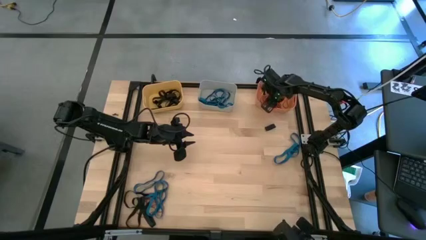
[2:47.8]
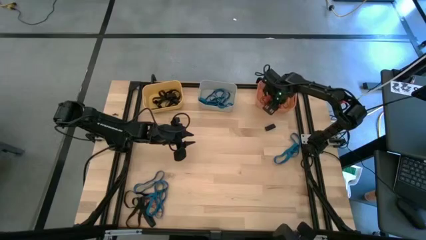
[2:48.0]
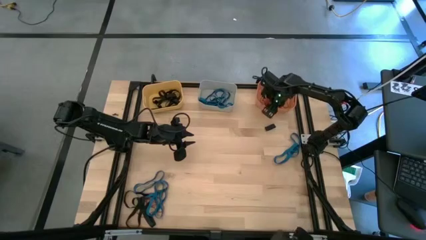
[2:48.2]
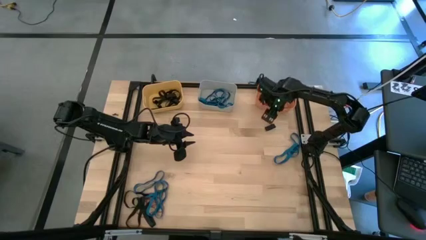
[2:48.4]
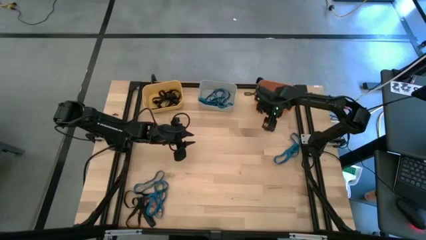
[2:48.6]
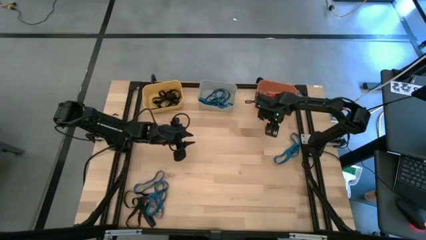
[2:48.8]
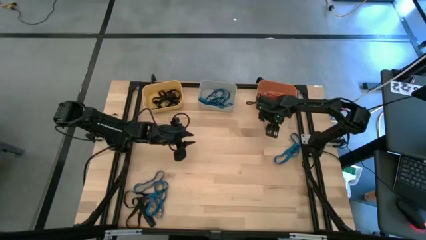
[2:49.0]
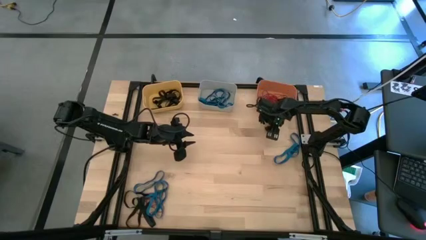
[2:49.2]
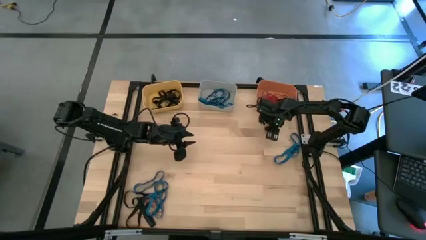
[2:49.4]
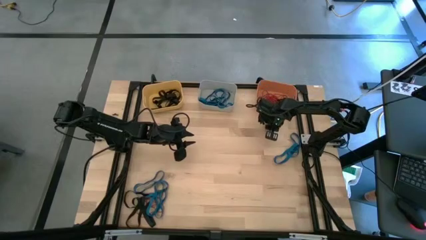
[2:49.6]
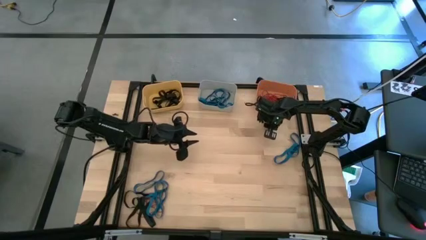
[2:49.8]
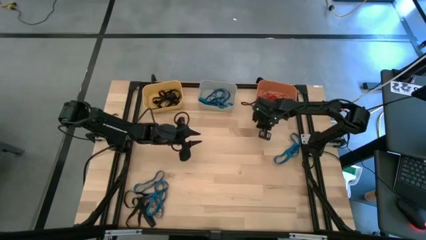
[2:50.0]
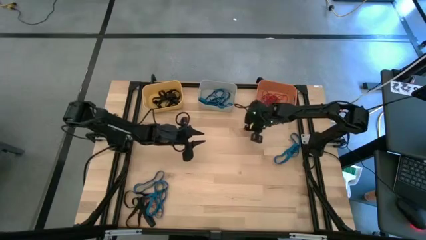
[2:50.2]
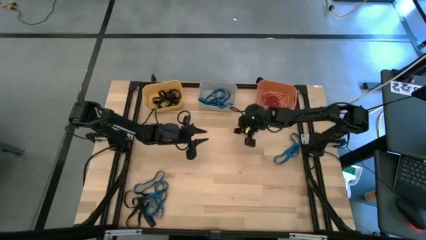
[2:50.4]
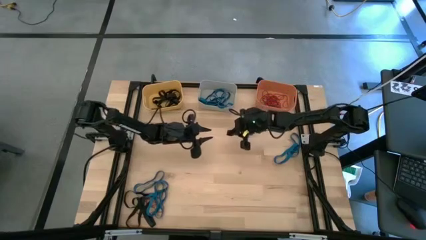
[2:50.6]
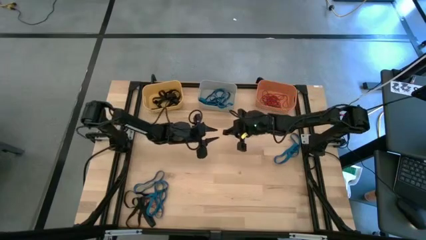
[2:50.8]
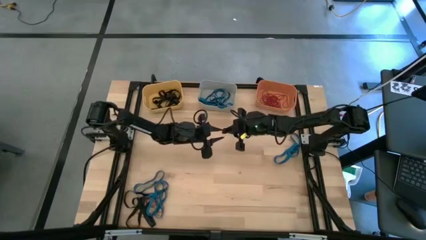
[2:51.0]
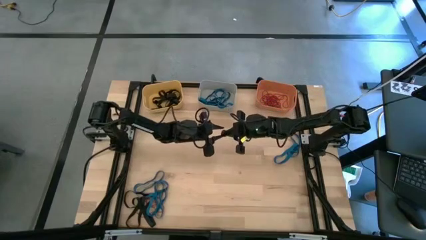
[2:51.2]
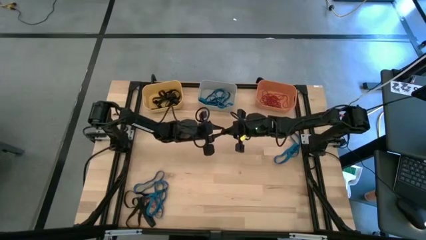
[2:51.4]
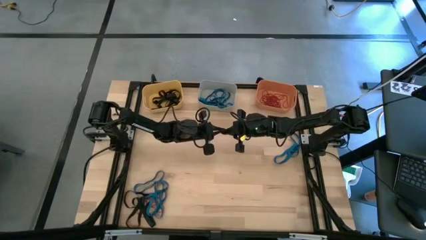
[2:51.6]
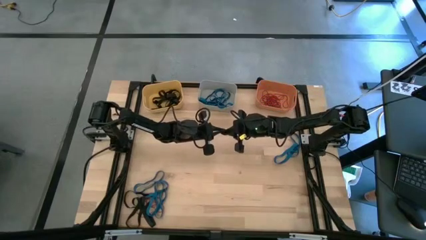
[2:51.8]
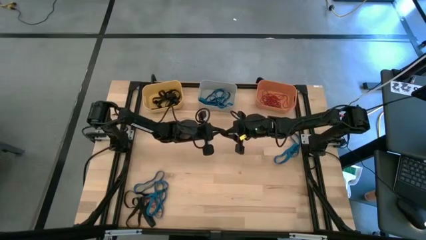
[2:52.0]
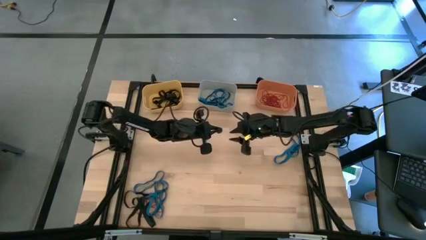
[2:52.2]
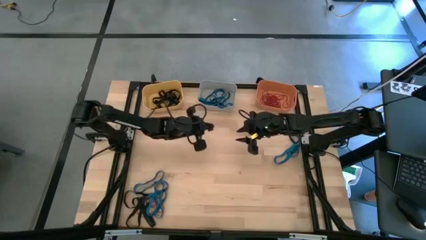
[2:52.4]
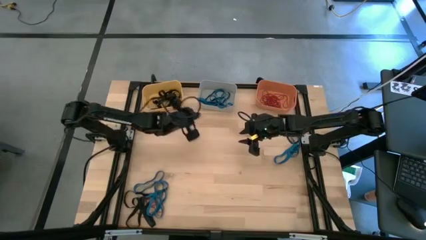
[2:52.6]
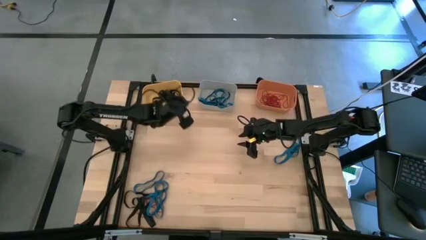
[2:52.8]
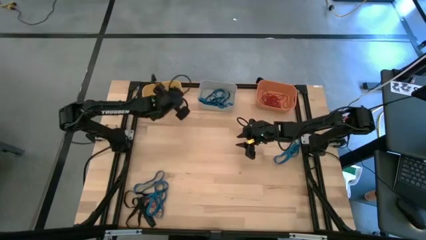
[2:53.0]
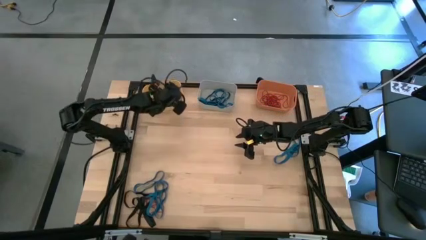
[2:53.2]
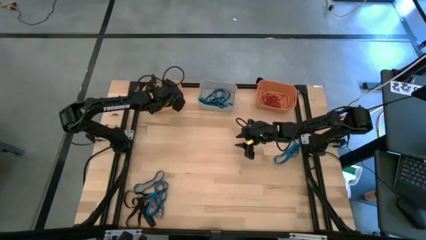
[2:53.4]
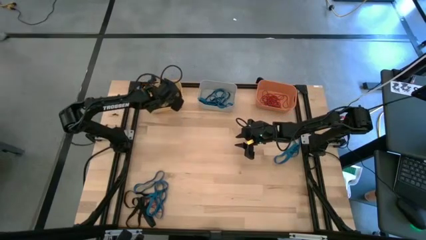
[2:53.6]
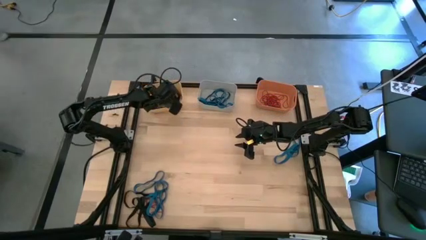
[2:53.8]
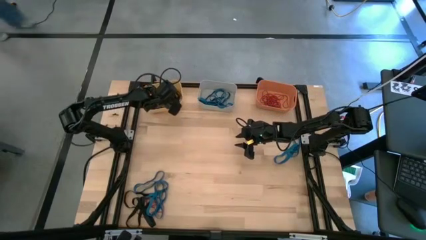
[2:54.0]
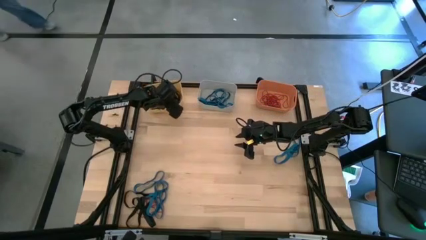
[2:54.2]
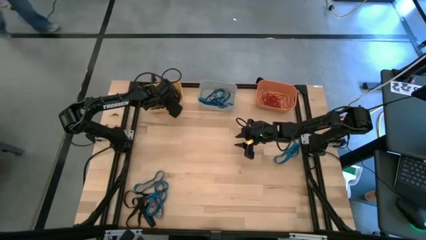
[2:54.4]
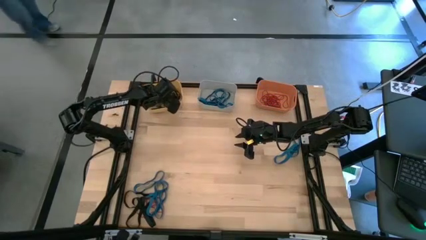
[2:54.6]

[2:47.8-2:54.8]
Task: Sort rubber bands into baskets
Put the black rubber band into the yellow bin

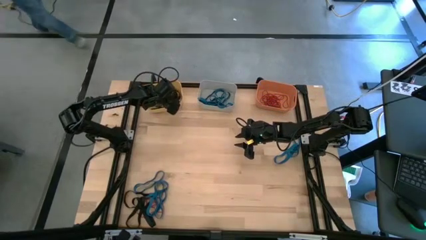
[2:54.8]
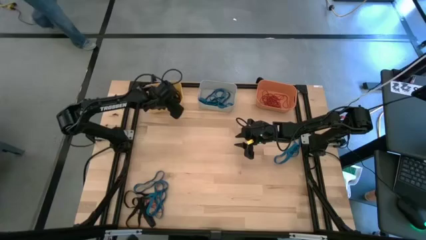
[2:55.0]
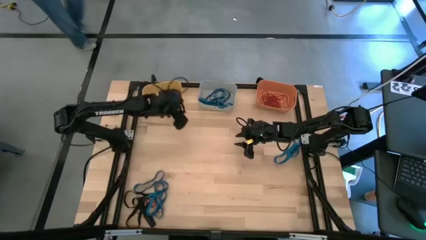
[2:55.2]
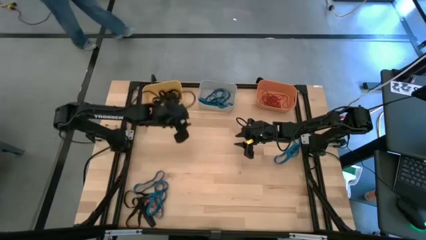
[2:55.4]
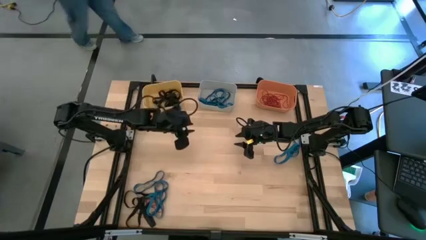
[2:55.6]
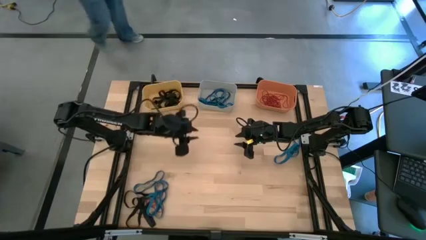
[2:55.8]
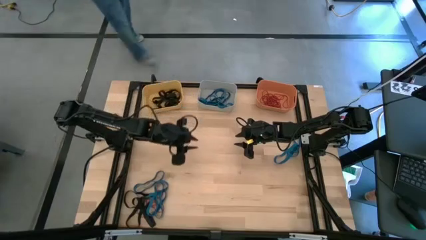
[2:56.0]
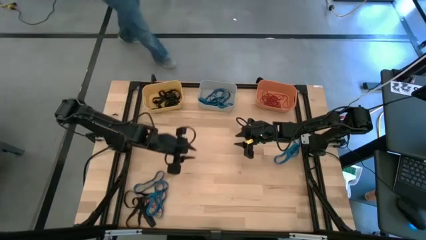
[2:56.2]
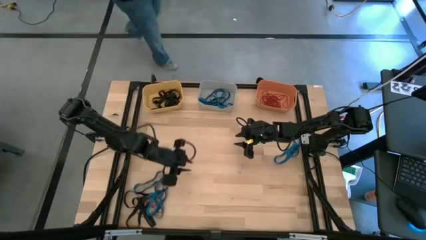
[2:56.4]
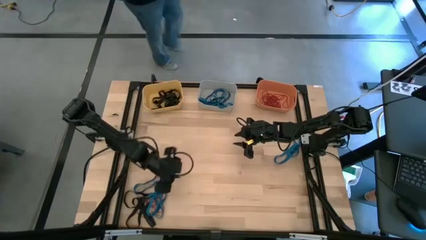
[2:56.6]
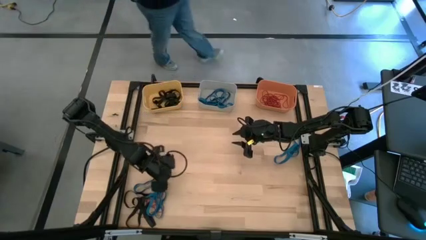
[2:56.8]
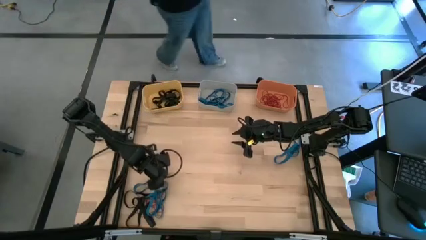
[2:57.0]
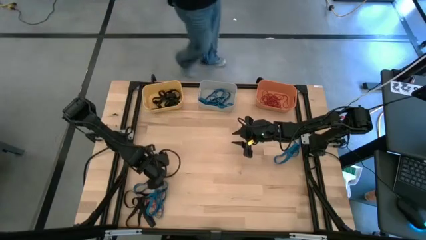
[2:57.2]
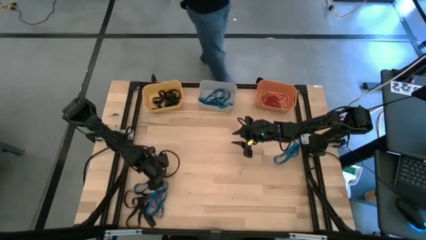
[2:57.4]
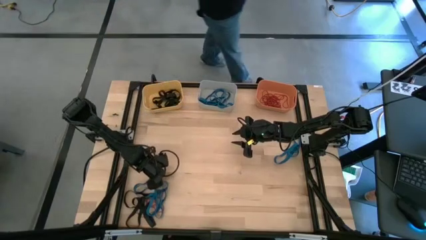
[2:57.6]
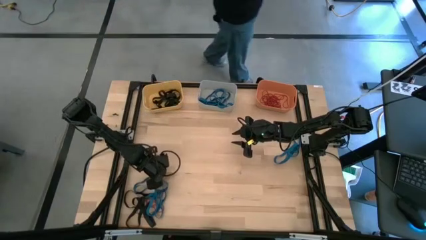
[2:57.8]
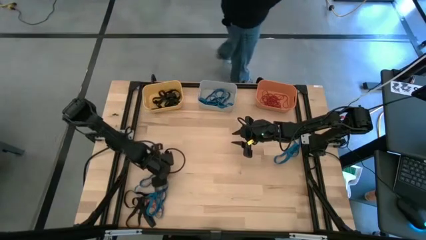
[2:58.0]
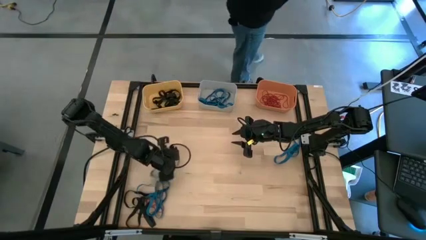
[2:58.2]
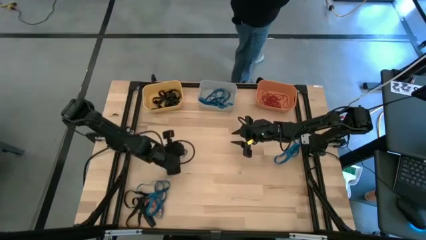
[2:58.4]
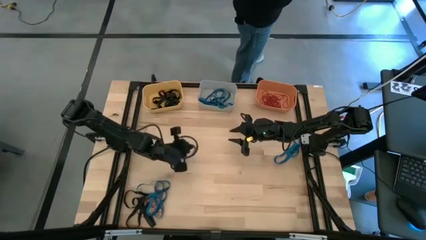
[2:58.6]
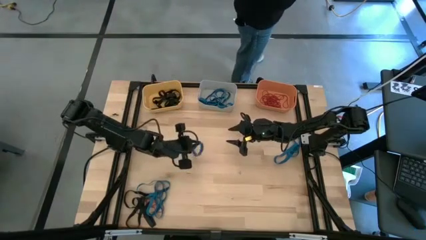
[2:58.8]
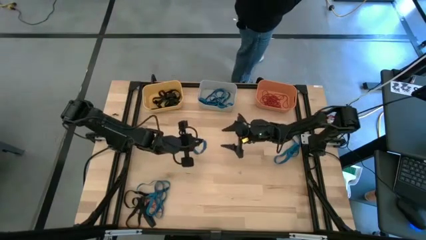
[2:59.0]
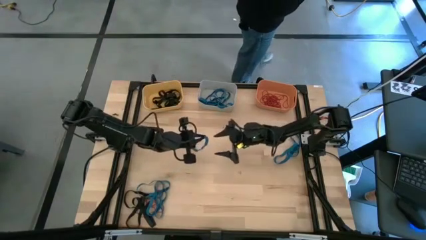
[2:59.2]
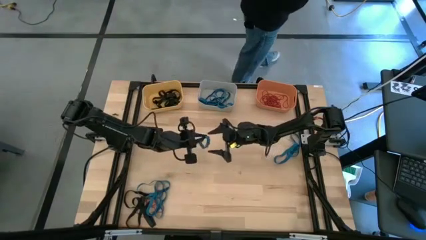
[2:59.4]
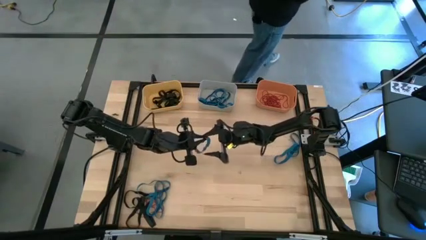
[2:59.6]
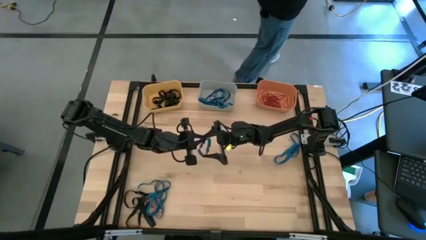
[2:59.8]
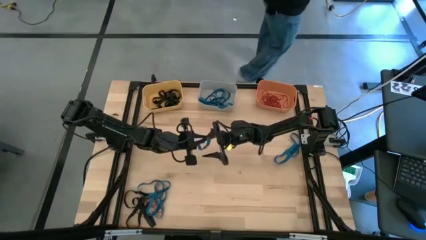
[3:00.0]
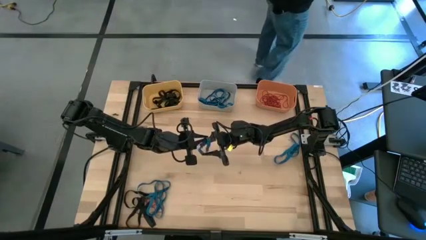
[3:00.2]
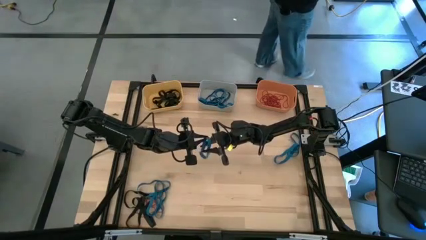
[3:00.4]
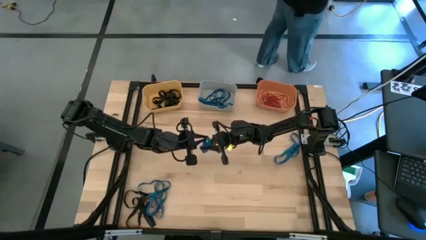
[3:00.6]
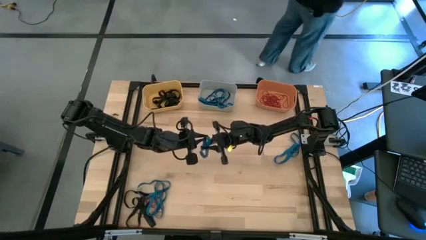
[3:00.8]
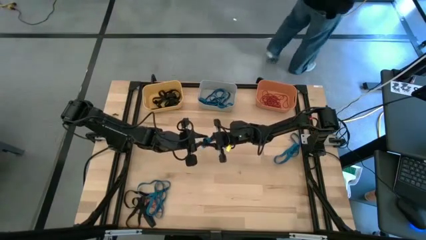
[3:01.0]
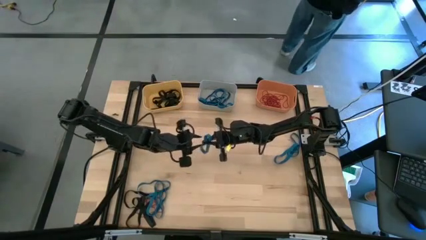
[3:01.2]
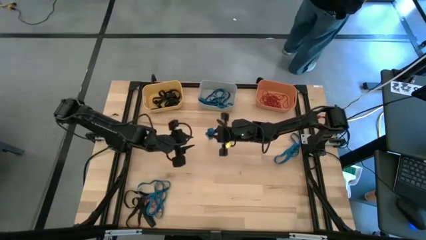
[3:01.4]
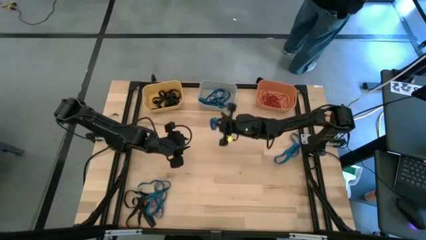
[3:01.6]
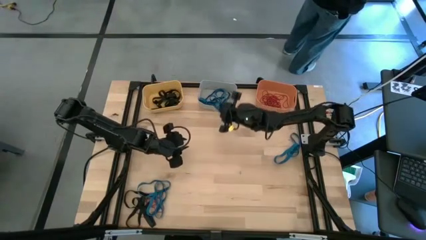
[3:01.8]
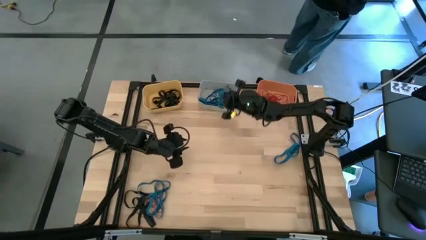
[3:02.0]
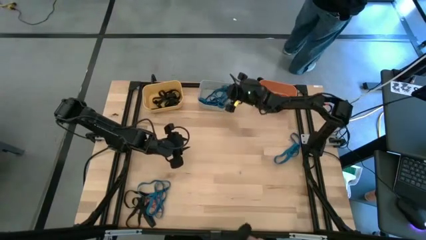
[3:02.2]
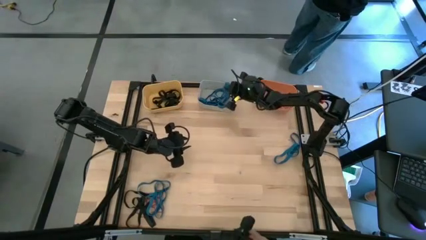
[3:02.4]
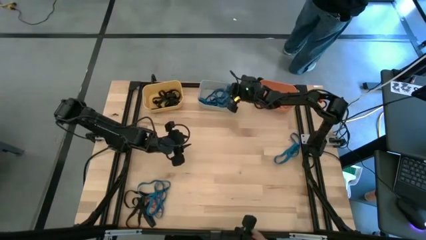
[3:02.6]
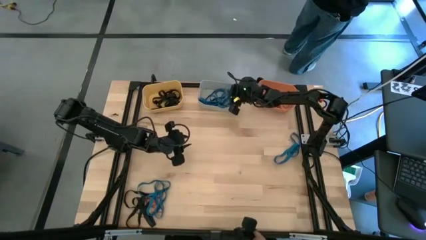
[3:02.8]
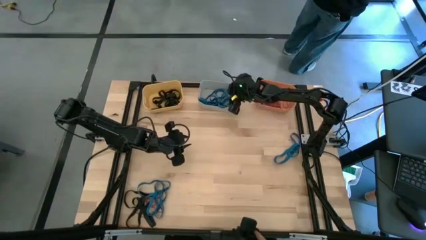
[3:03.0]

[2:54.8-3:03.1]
Put the blue rubber band into the grey bin

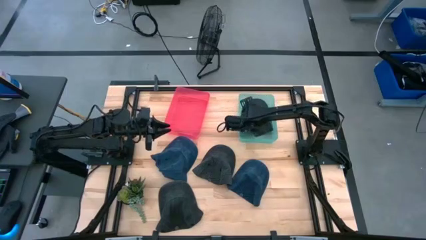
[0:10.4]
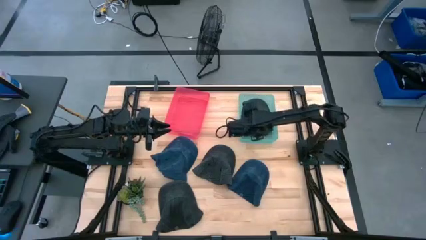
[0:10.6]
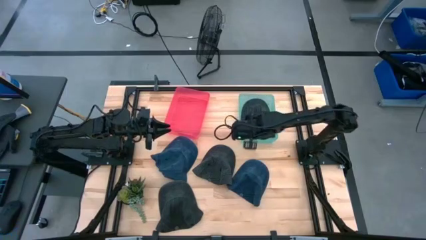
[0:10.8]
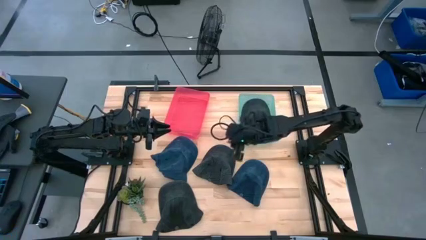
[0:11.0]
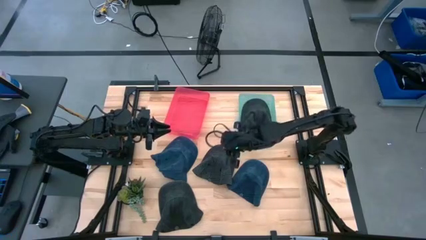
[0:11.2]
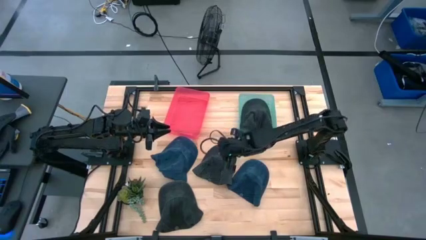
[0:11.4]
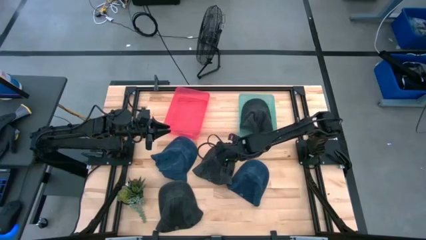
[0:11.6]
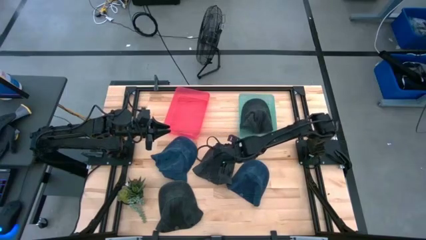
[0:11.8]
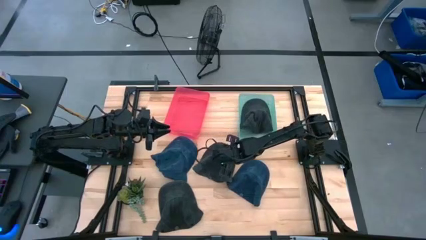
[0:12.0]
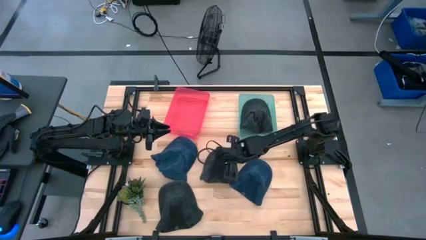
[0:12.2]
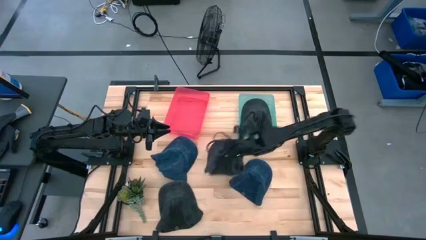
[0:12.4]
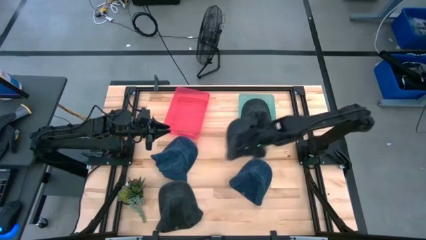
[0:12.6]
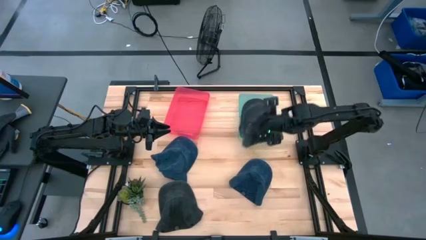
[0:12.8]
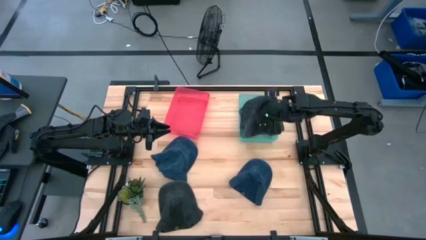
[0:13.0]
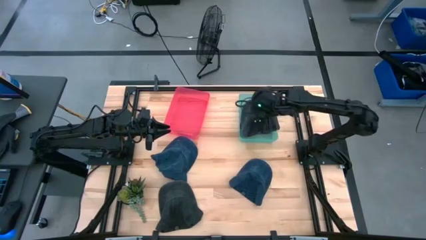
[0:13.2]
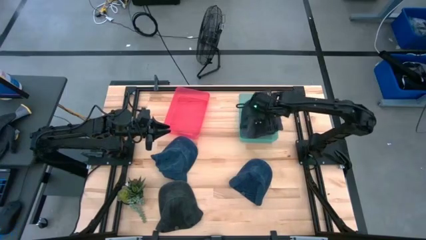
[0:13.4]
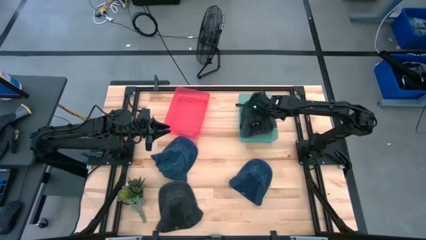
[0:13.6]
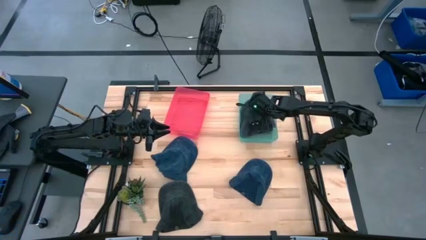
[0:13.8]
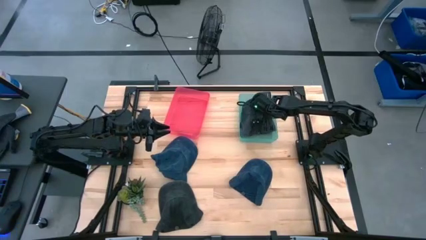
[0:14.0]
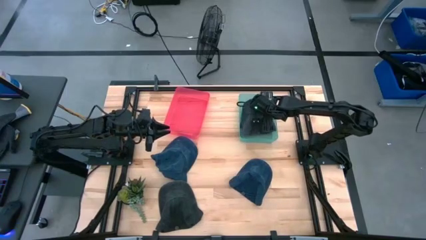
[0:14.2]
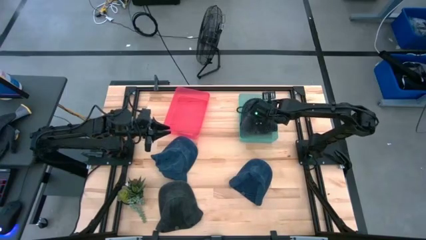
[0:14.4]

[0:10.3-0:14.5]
Task: Pick & Place hat
Put the top black cap into the blue bin
